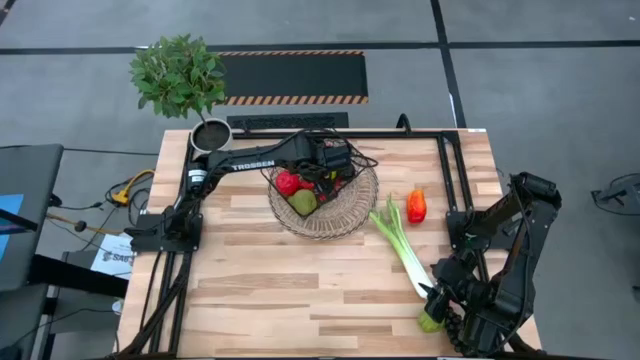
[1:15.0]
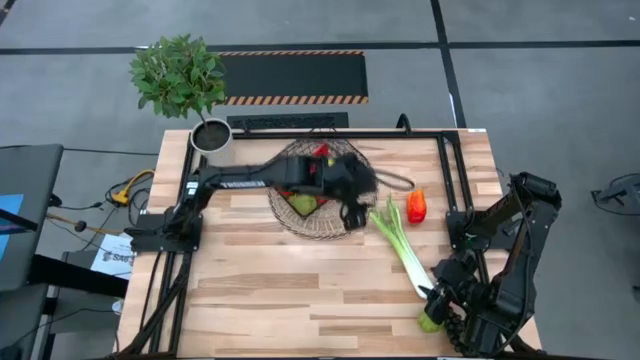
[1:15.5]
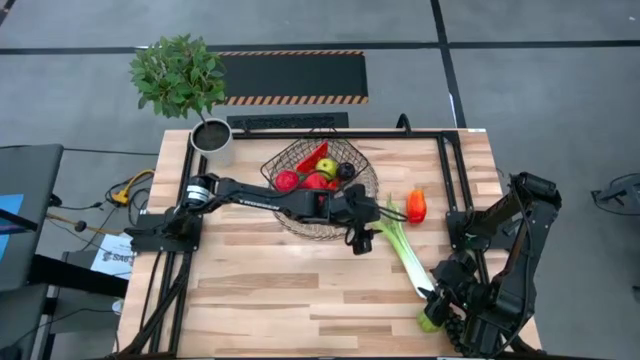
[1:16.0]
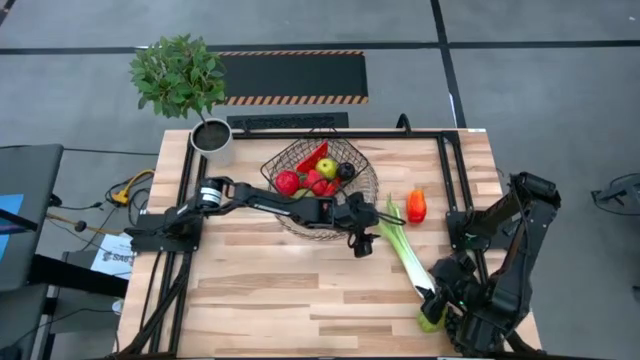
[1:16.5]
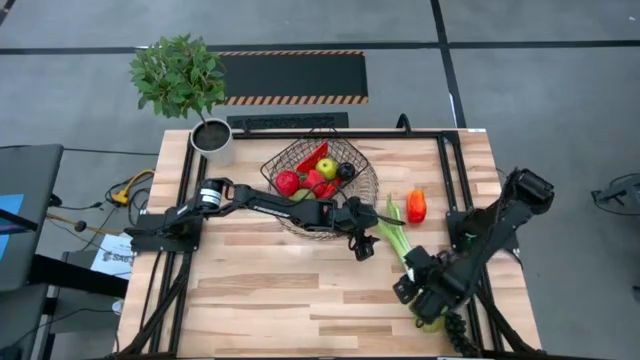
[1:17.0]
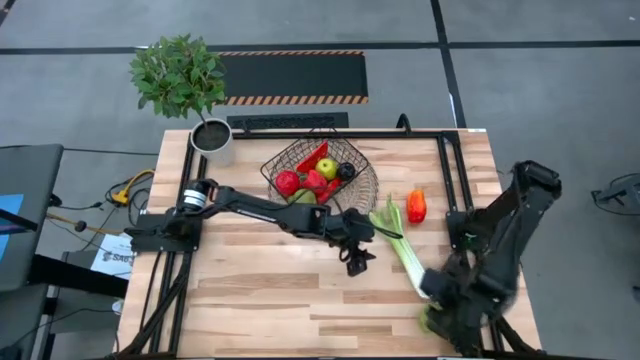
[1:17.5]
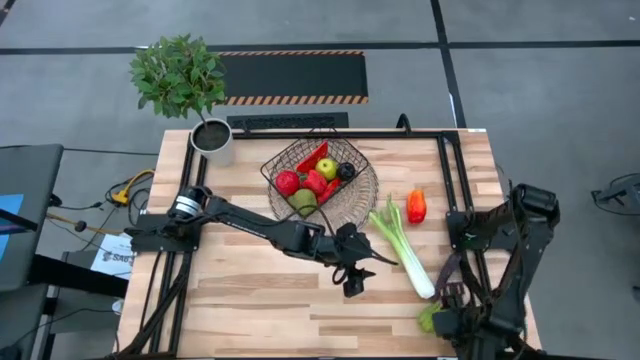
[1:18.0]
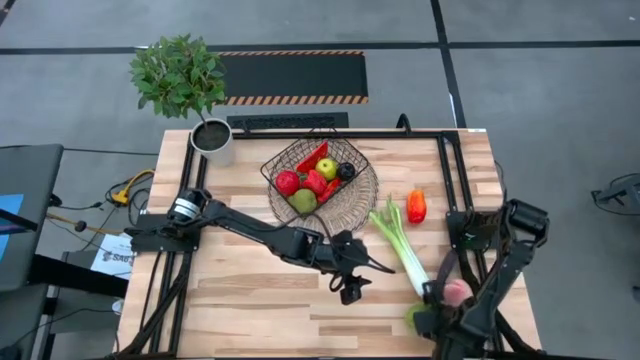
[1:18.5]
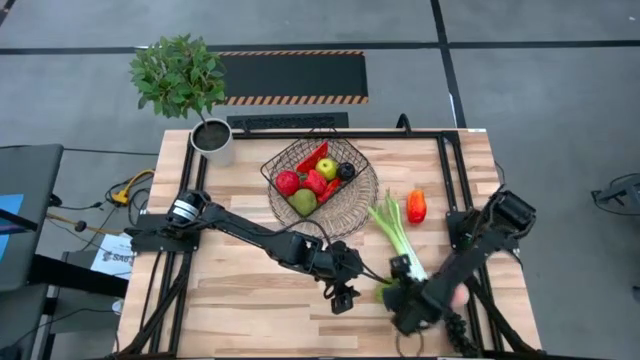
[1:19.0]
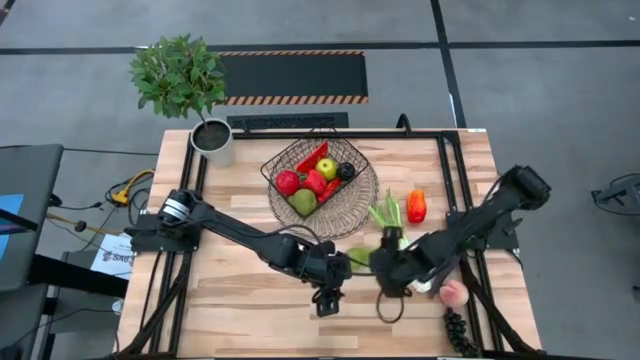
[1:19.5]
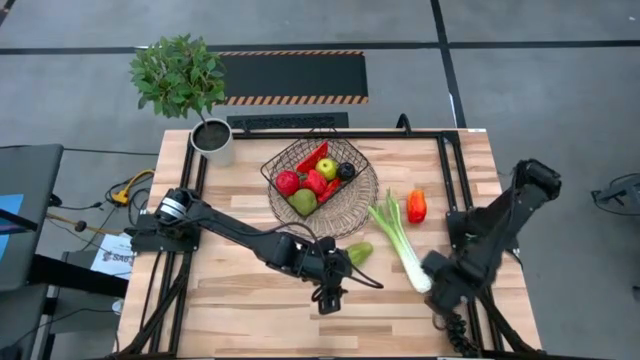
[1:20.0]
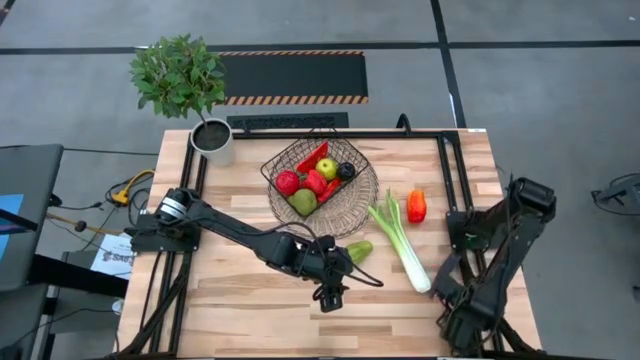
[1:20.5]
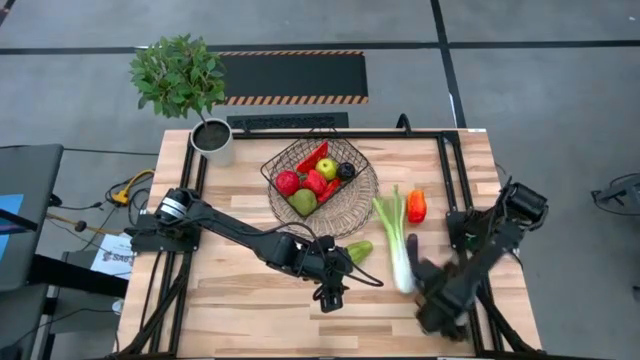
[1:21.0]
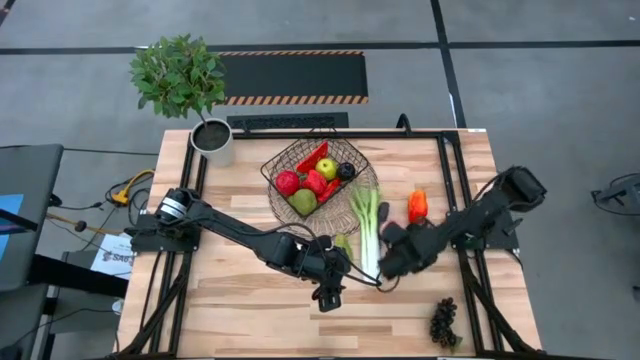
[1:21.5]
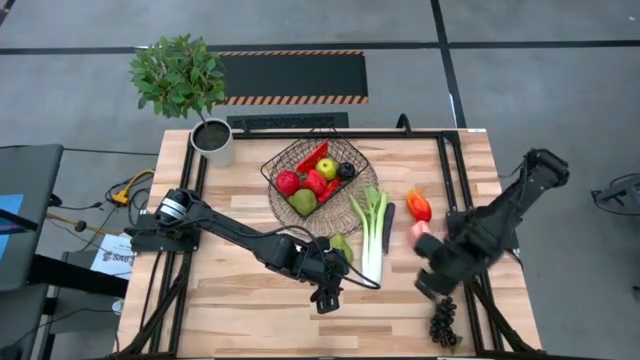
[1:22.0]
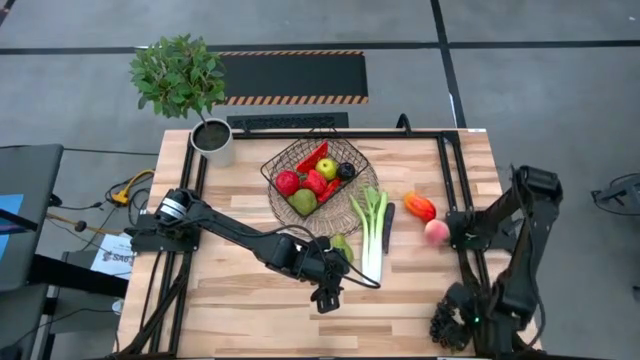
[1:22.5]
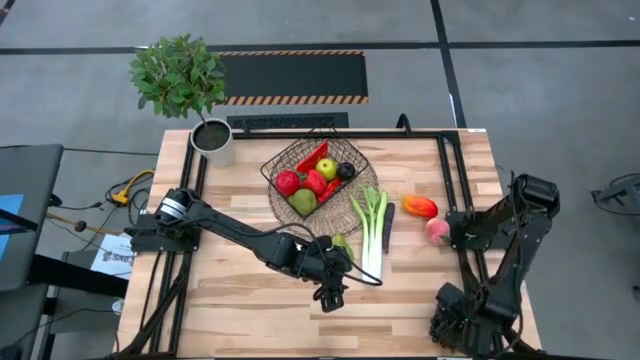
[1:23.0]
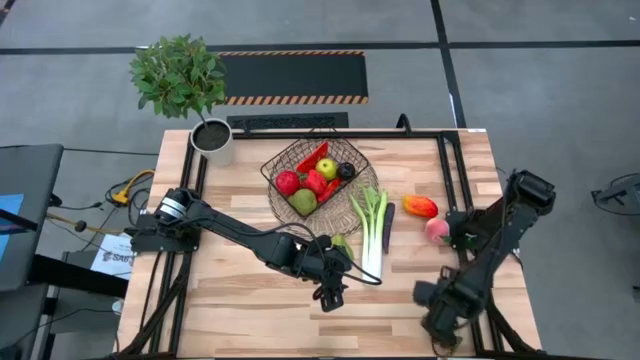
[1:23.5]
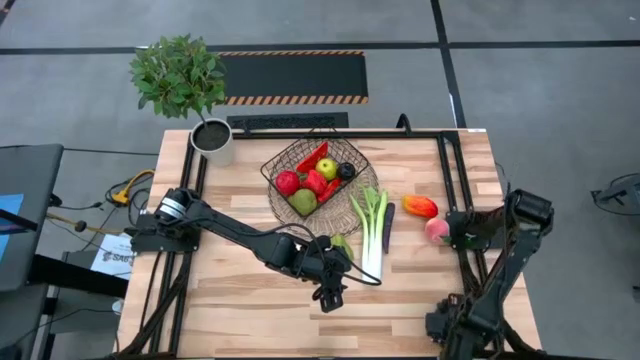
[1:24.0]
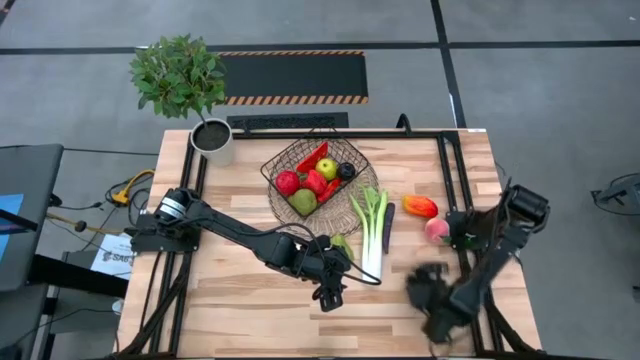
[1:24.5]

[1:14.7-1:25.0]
Task: Build produce basket
Adjust the produce on the table

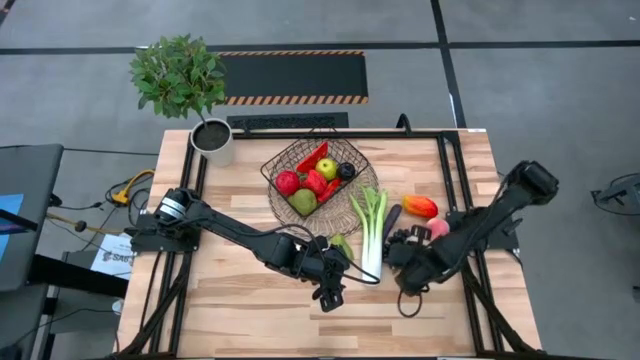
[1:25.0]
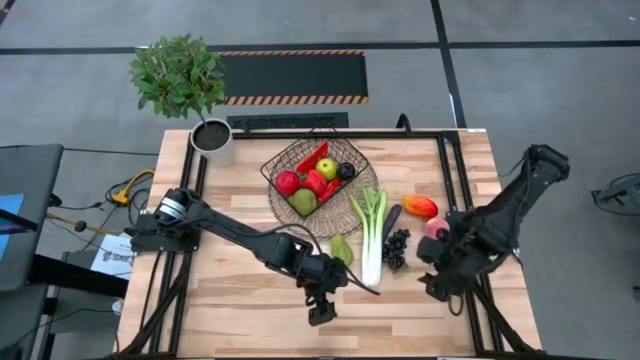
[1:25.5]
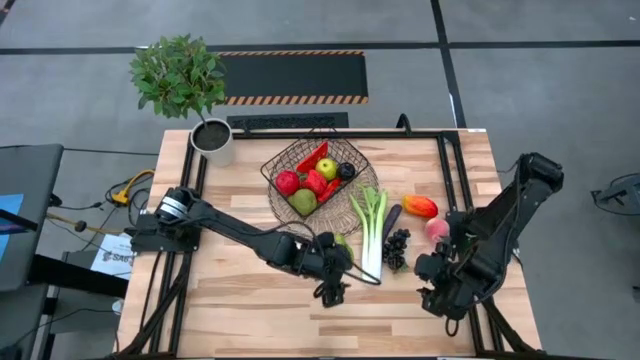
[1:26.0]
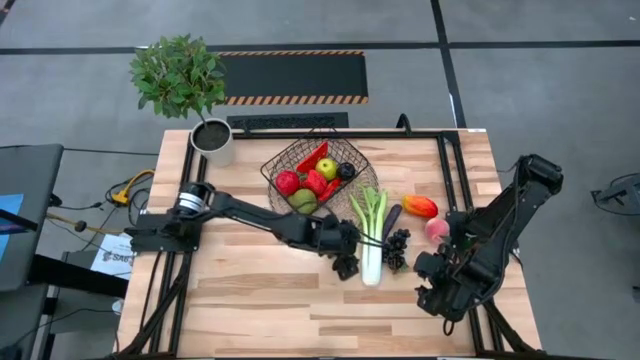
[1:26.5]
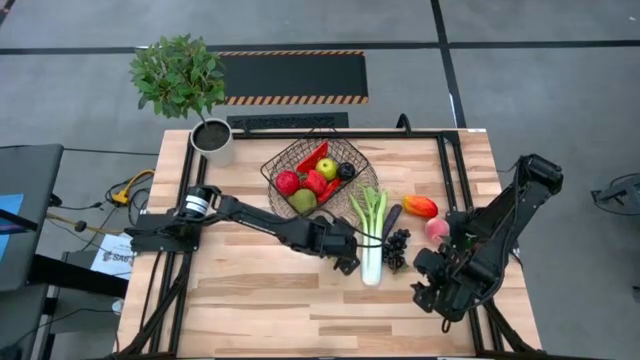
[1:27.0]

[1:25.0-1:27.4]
Put the green chayote into the wire basket

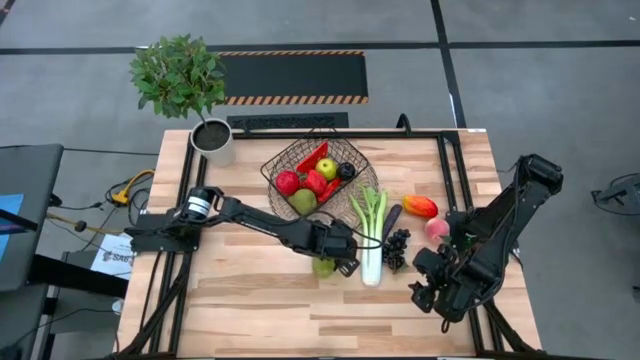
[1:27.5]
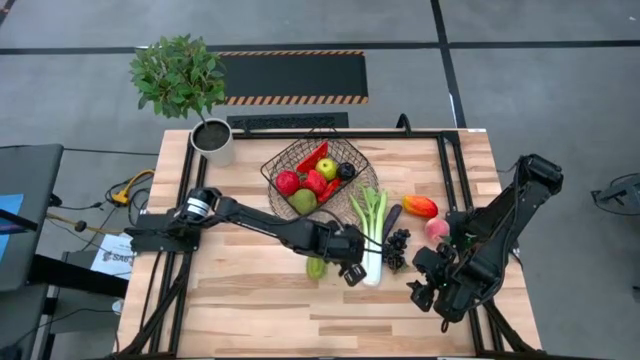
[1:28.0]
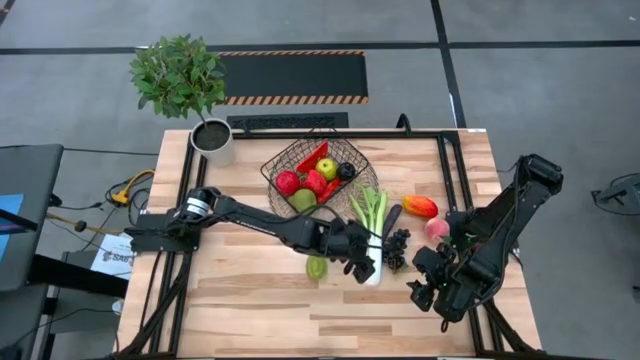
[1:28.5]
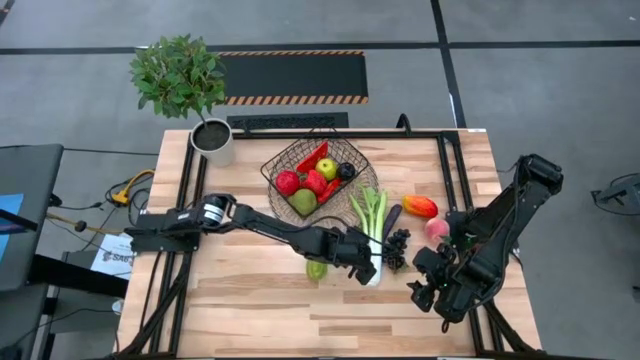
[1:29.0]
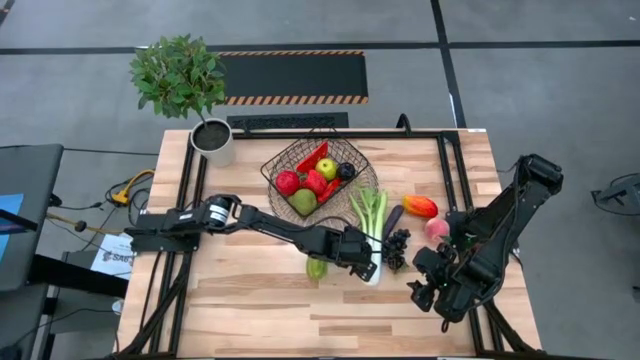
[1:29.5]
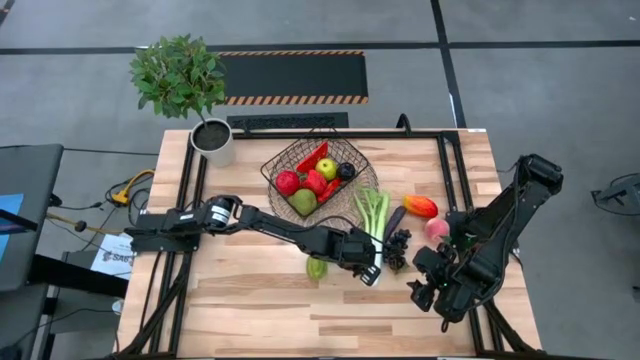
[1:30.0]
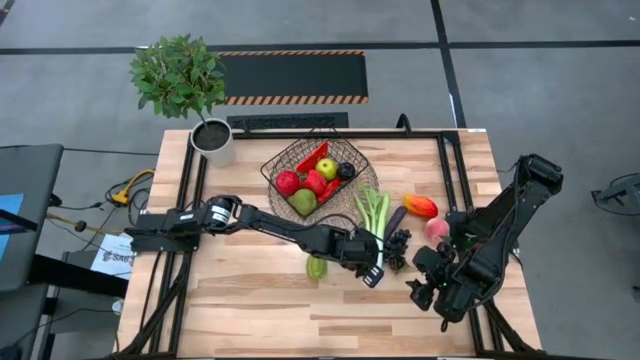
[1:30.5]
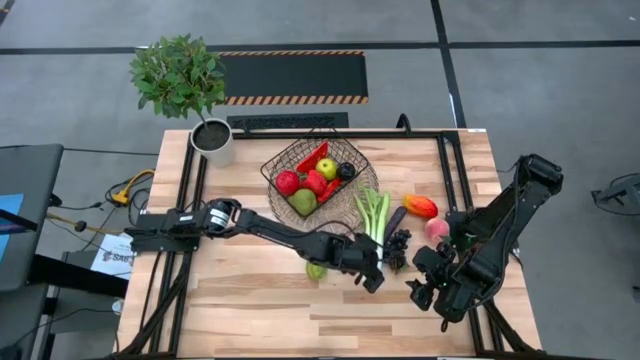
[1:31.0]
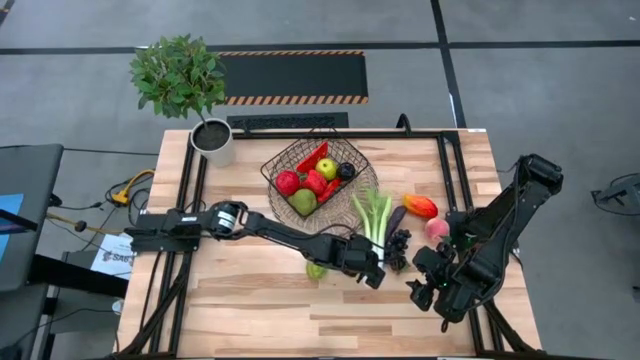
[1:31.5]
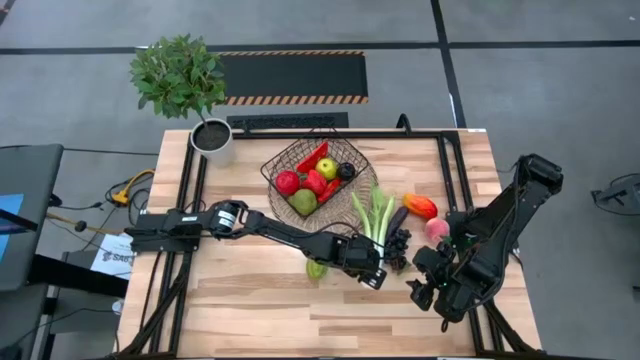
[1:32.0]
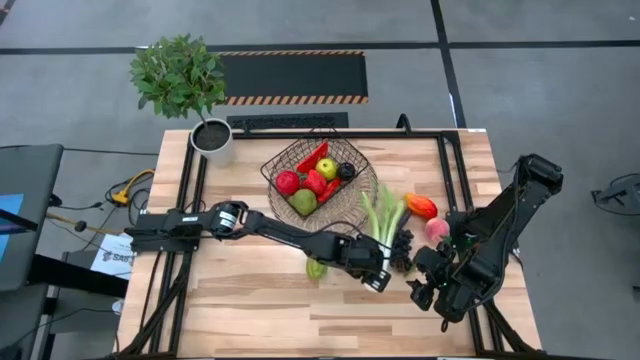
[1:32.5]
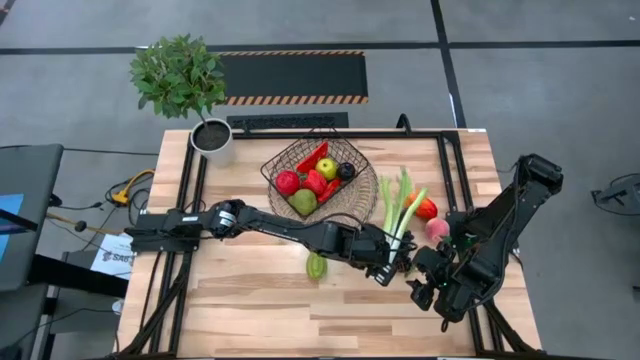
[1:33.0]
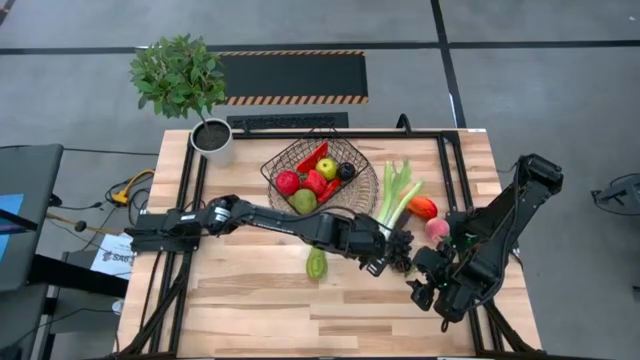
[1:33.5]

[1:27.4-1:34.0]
Adjust the green celery

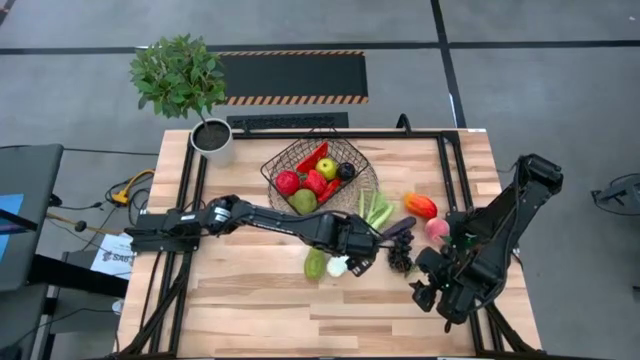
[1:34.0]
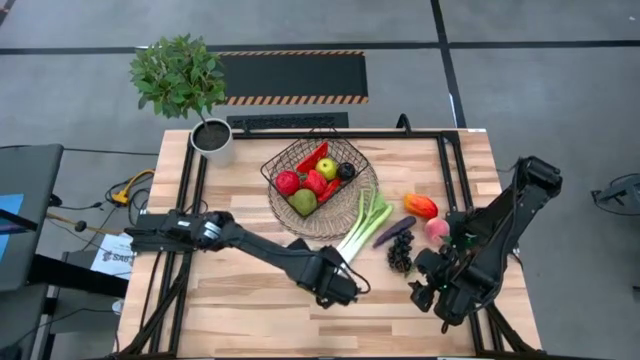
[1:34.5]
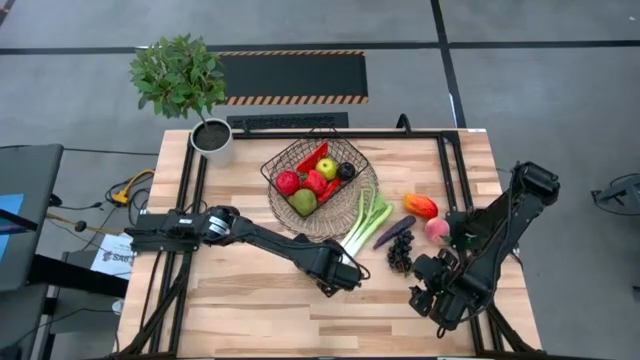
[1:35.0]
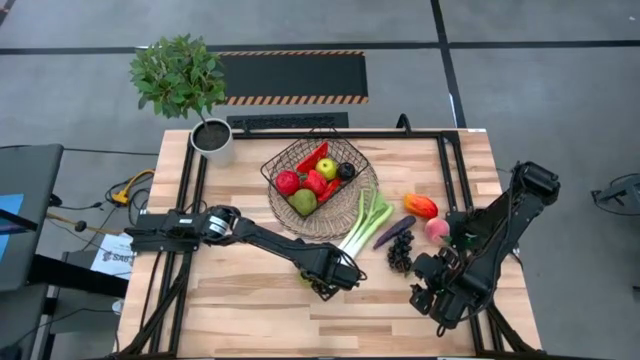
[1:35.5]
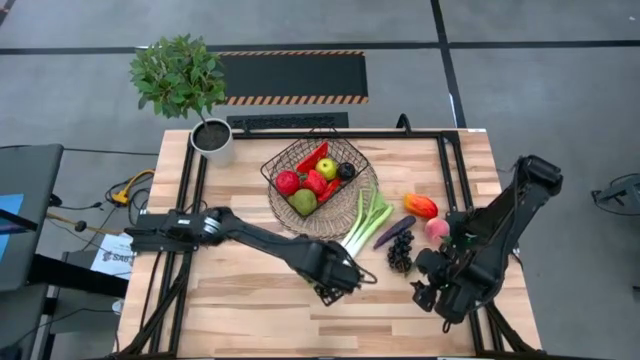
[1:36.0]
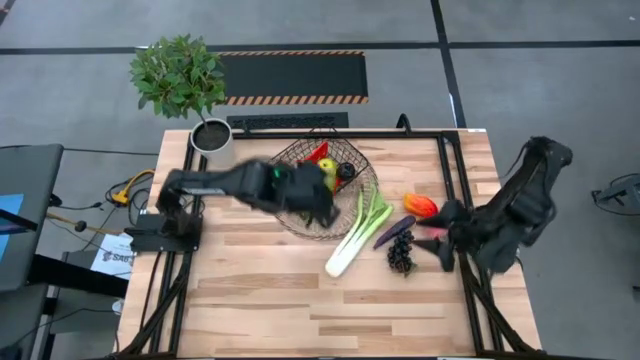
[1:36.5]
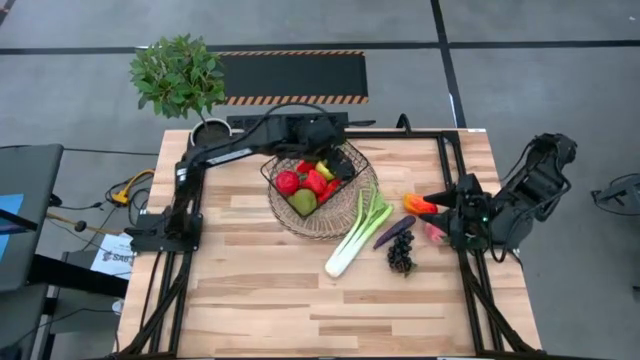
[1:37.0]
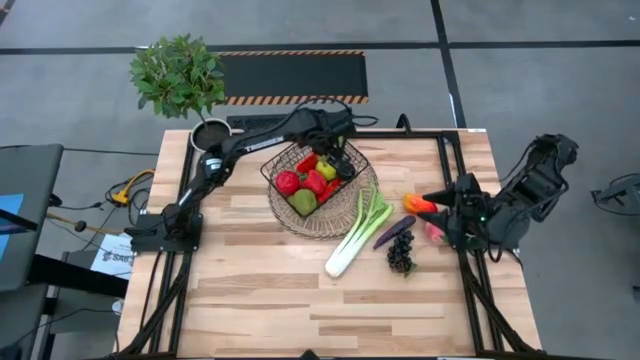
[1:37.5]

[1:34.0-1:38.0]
Put the green chayote into the wire basket
